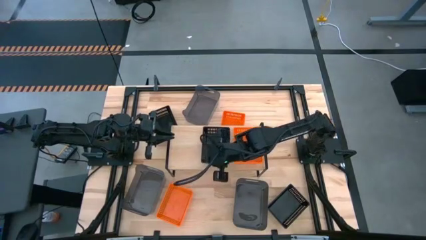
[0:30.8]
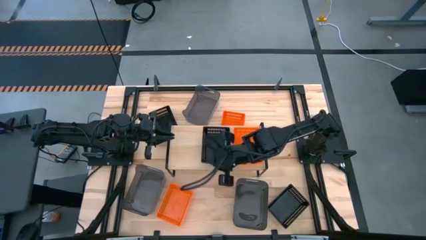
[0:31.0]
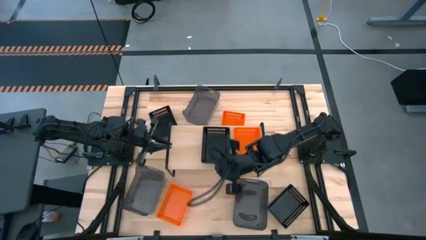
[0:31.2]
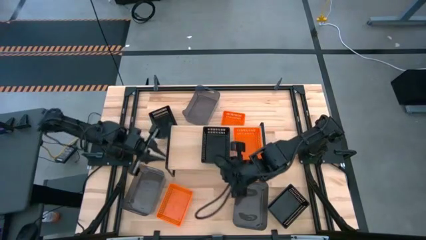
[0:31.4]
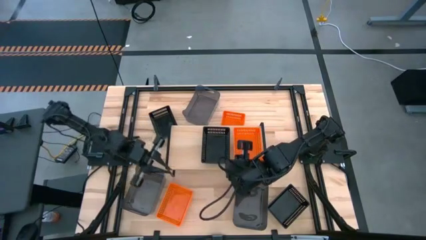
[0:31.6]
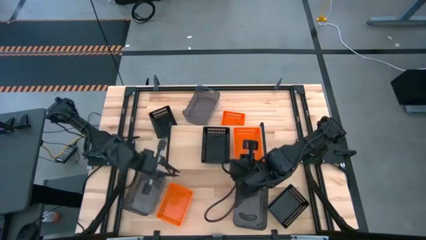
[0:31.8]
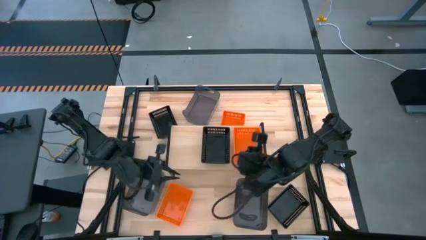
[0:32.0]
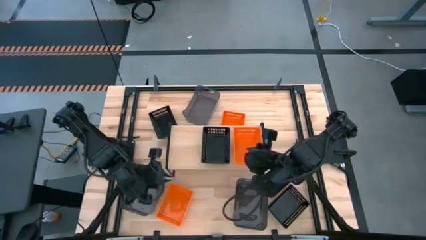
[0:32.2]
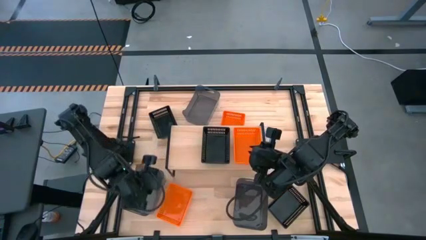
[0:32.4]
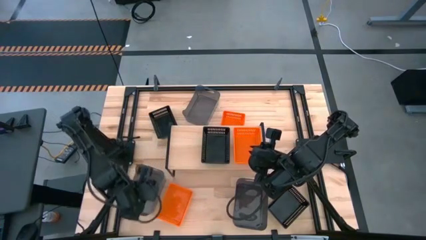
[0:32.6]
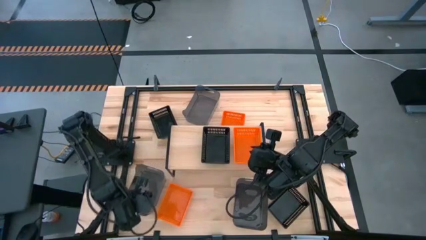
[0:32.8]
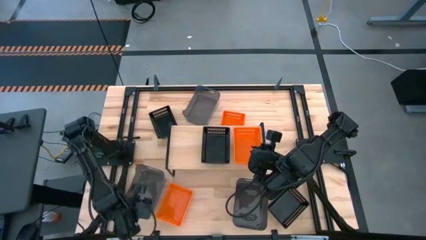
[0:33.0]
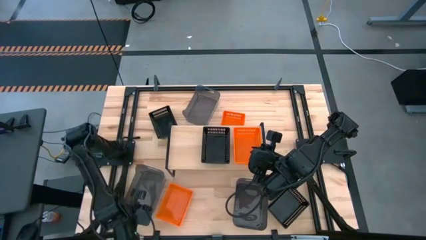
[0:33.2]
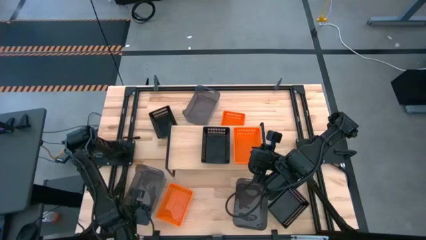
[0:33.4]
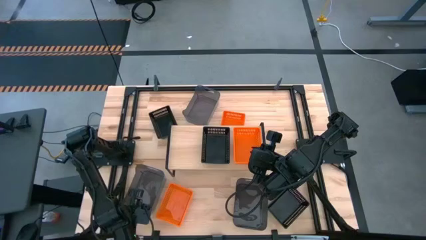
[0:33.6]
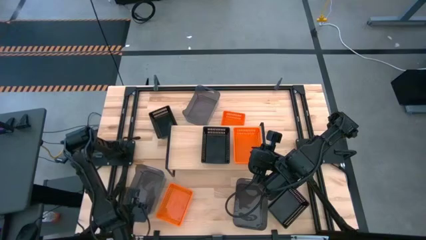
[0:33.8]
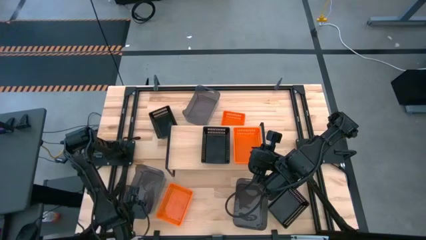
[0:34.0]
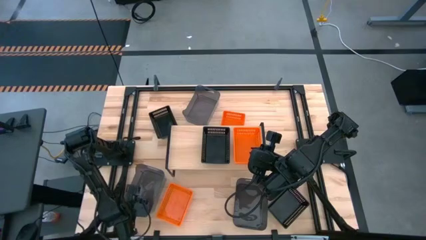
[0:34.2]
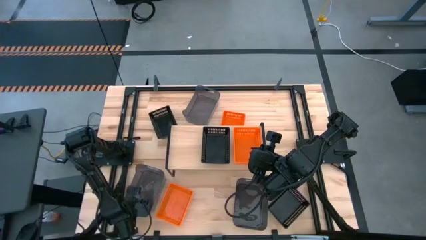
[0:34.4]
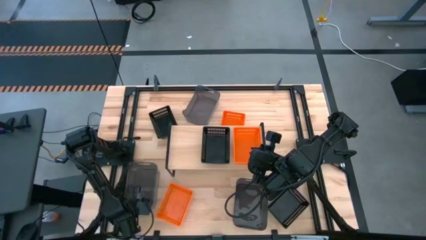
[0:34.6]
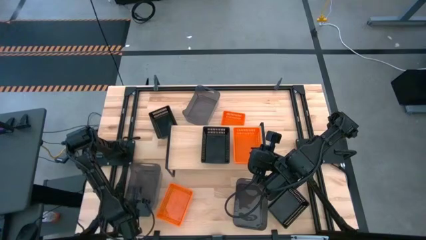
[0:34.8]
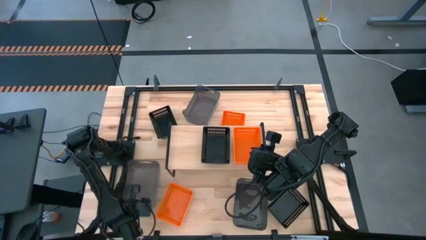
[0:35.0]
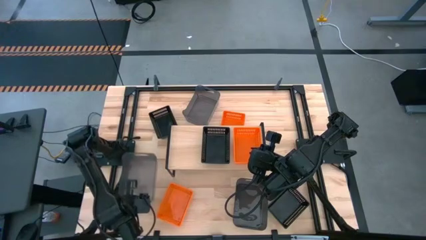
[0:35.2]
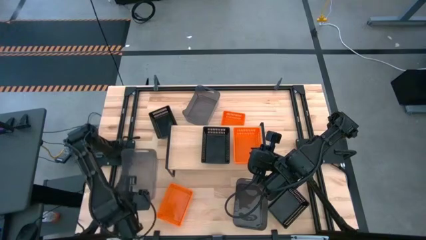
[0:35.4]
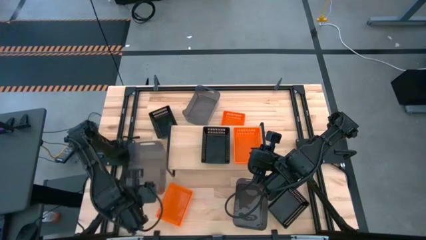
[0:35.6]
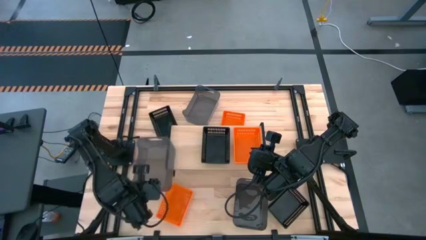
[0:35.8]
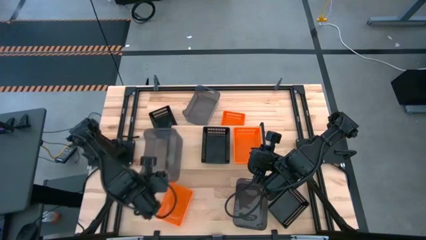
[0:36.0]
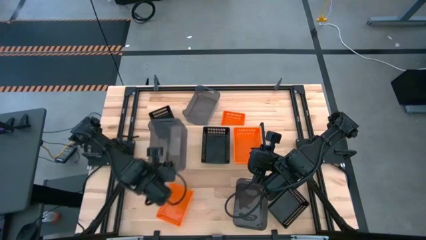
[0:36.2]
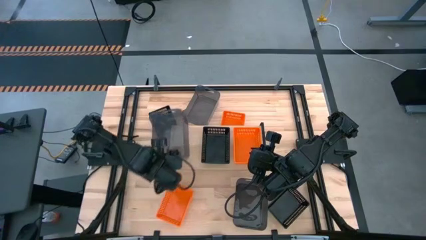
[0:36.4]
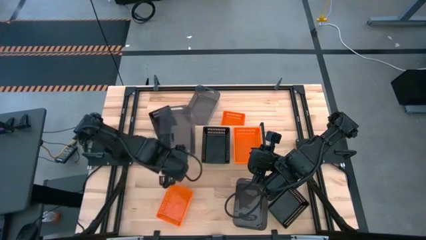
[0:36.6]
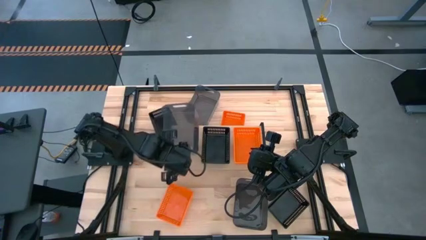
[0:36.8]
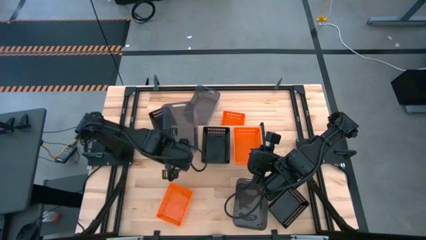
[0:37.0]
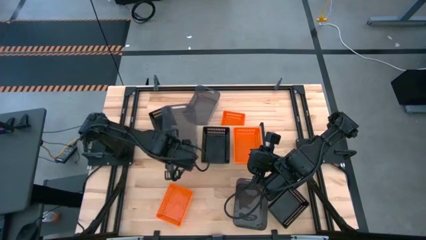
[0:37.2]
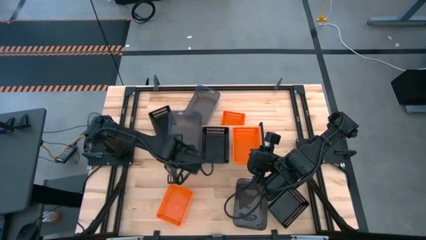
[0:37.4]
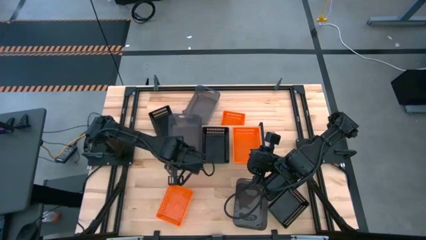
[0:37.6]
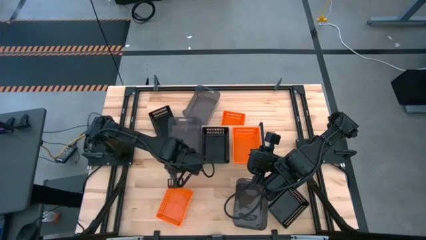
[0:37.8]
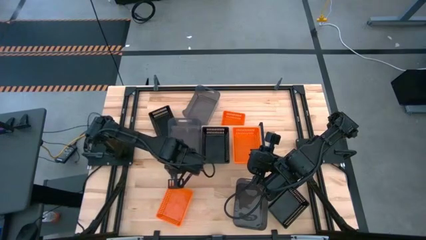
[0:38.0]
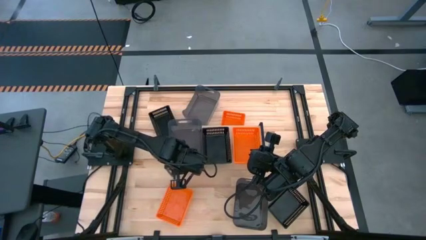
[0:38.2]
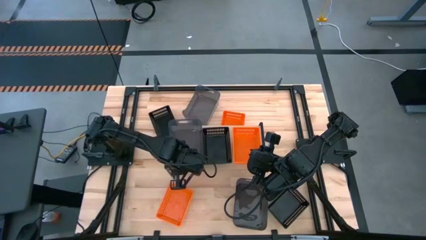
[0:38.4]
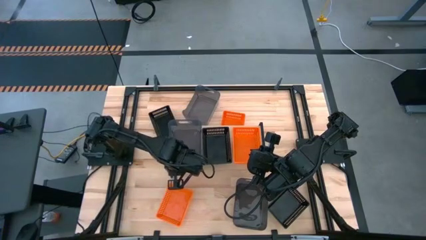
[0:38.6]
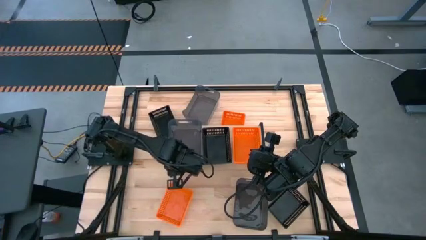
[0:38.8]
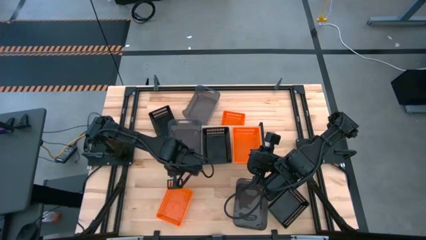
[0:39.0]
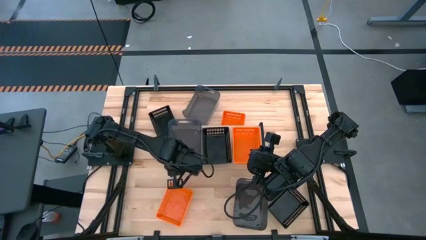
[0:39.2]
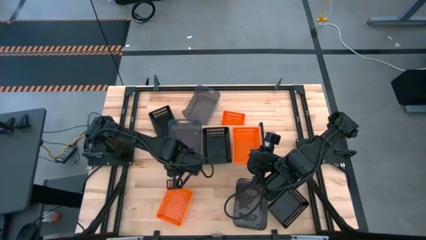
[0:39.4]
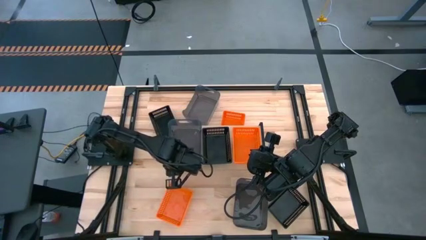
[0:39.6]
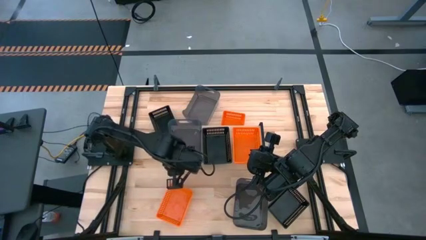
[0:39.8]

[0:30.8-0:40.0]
Task: Stack baskets on shelf by color
Put the bottom left transparent black bin on the shelf

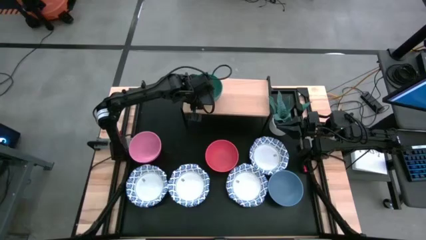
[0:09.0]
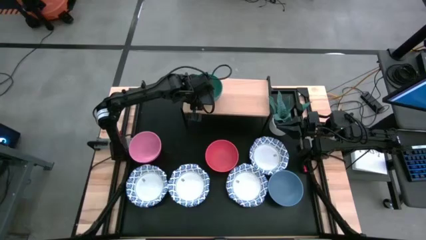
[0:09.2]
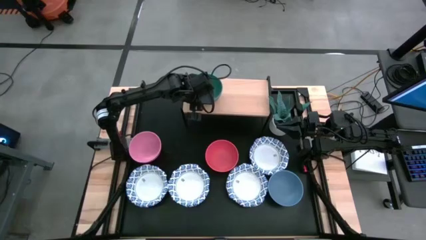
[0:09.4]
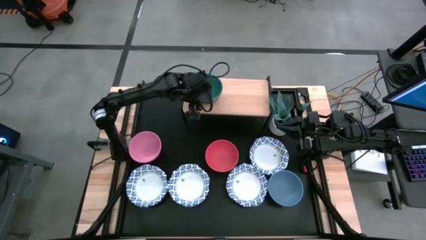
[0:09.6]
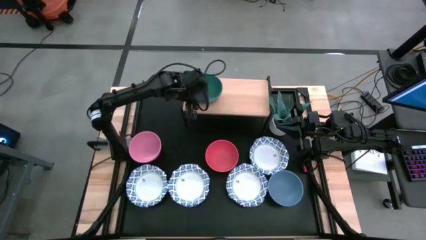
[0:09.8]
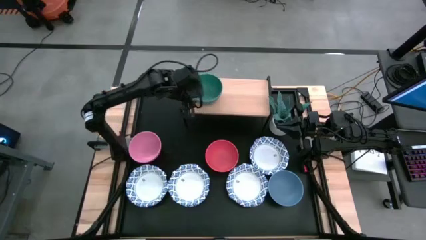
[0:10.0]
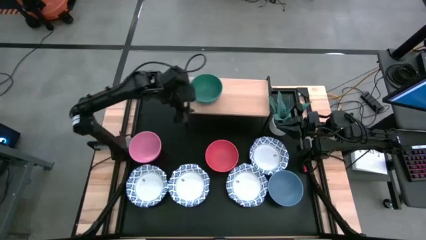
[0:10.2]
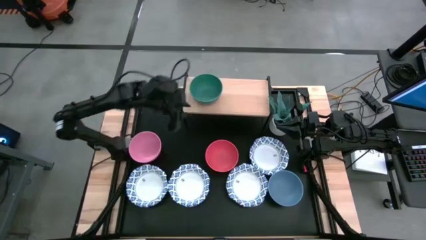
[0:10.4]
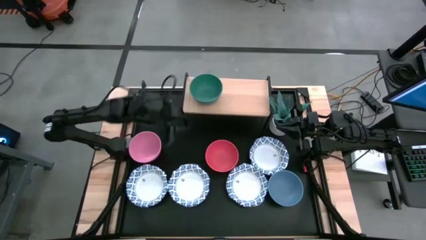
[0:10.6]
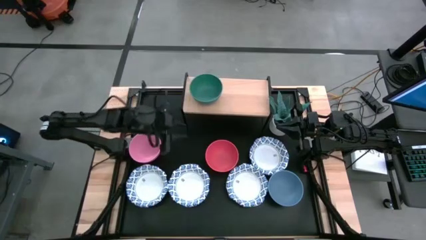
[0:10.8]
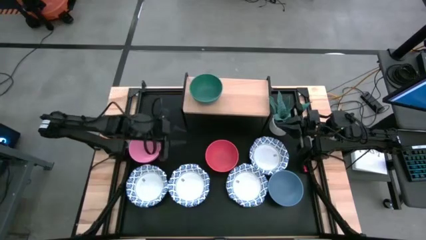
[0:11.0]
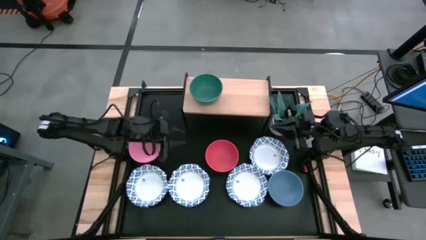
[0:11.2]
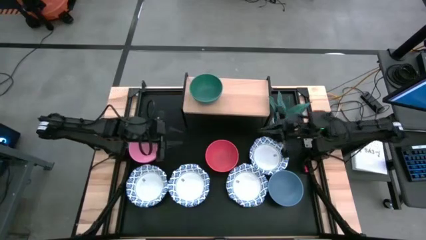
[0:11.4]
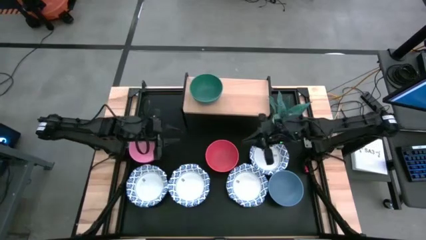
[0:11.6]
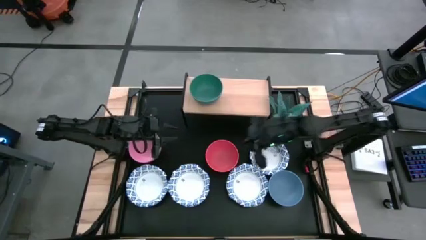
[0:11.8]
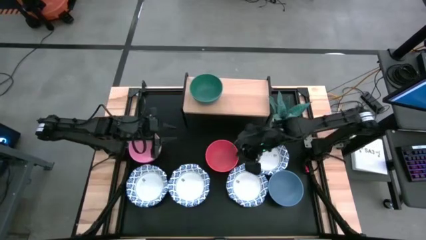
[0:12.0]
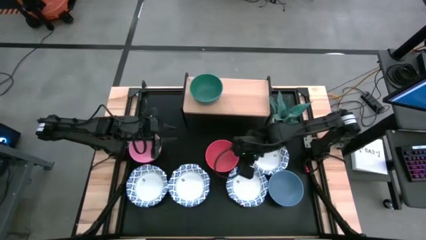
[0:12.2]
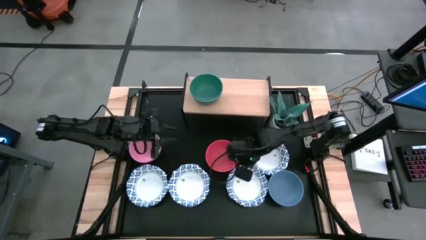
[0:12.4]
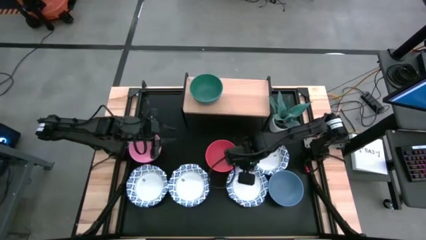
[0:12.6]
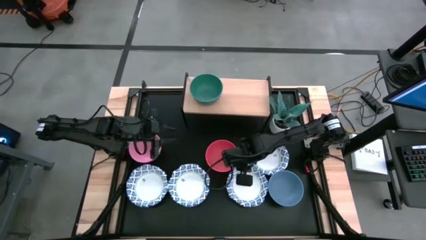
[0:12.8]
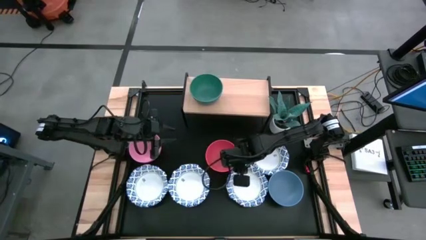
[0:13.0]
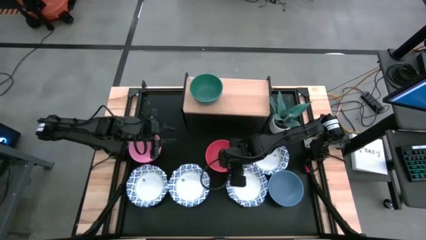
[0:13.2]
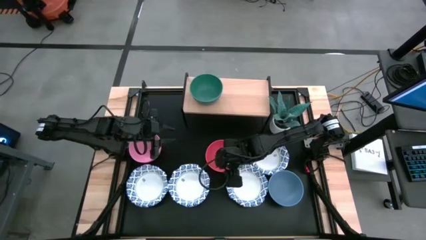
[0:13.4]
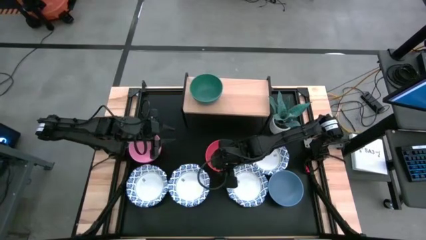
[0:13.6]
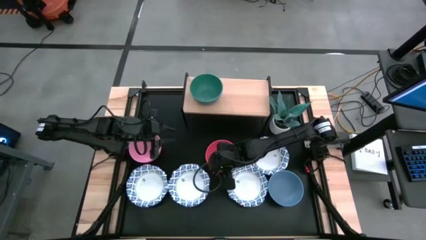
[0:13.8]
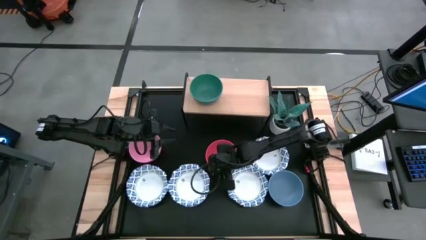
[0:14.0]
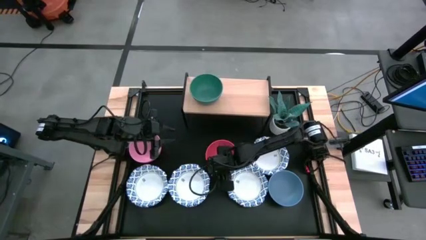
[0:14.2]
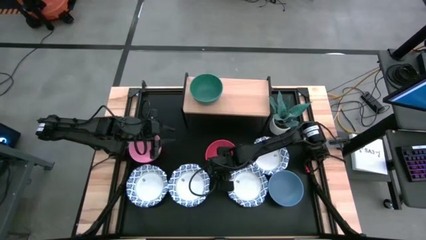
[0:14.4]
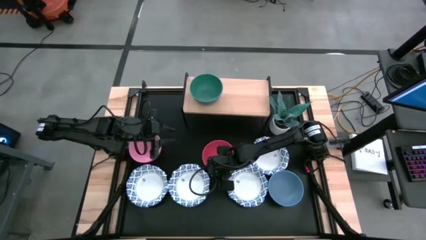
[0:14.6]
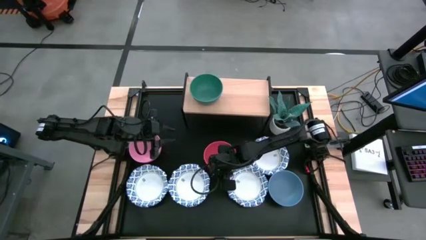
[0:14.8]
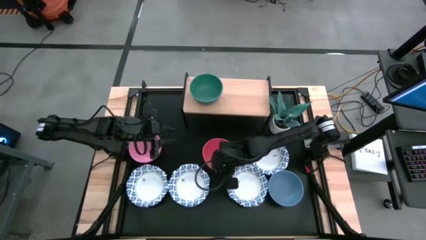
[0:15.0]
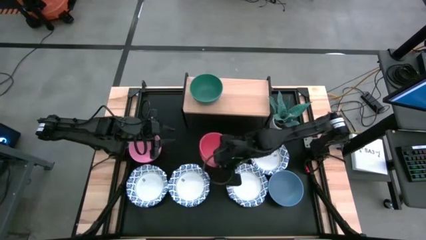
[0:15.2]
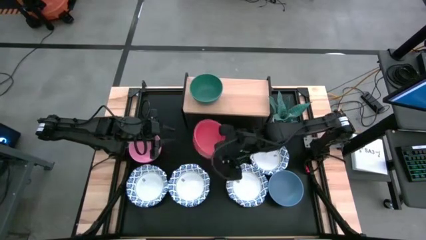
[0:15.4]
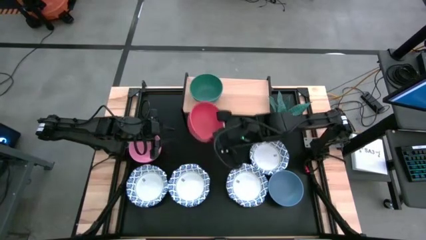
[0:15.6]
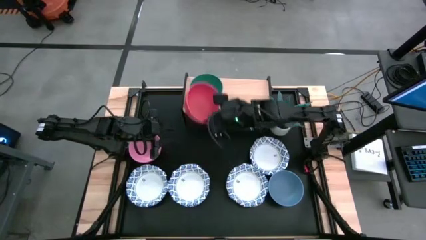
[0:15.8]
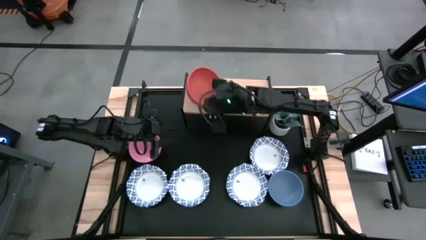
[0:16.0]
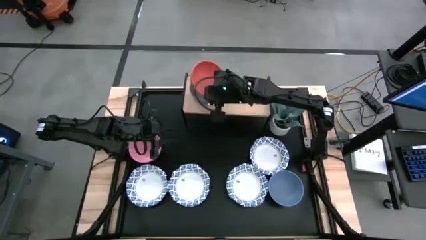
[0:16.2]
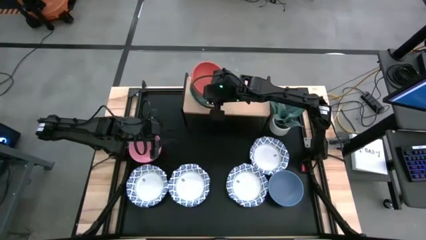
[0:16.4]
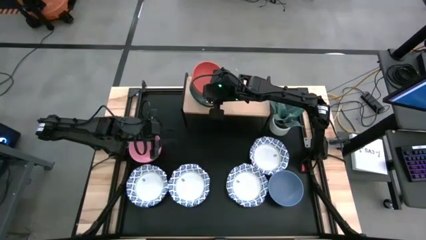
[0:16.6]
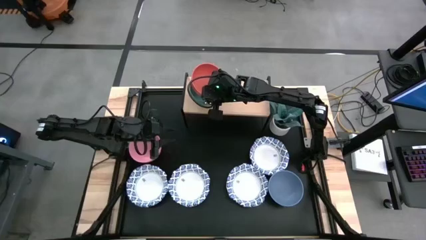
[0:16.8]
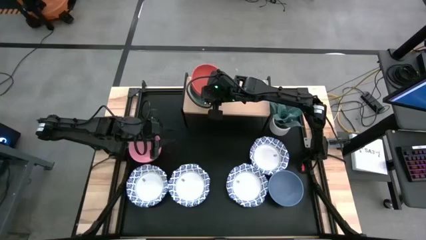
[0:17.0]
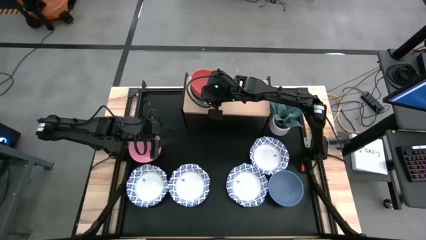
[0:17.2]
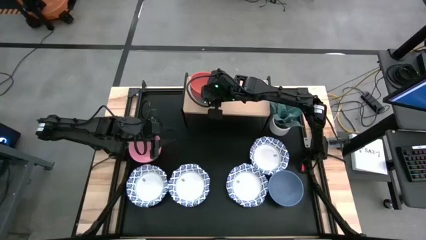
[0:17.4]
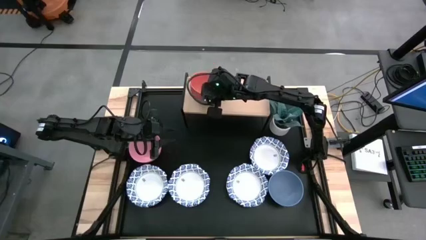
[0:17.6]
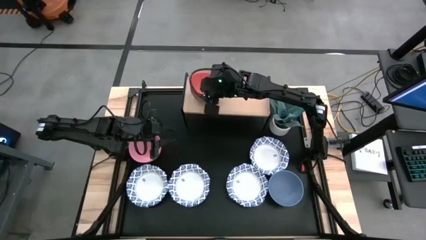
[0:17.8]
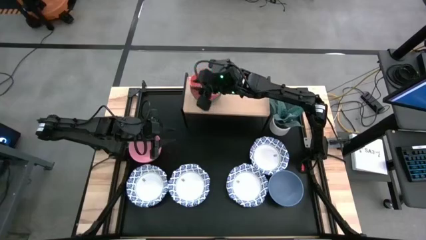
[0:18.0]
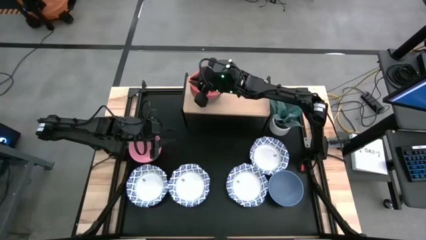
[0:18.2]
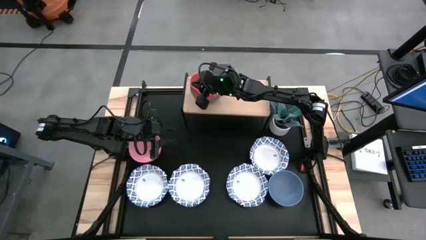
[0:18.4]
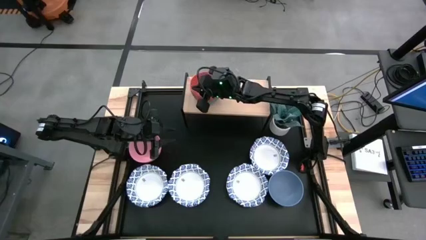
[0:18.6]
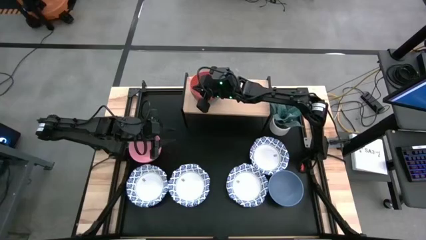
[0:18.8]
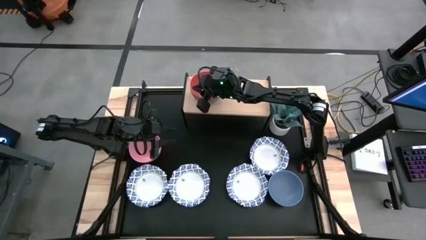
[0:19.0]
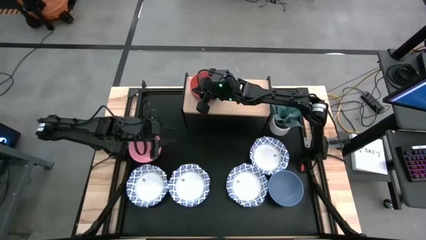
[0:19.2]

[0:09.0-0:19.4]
Task: Place and stack bowls onto a shelf
Stack the orange bowl on top of the green bowl on the shelf
